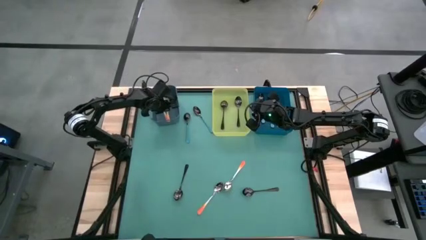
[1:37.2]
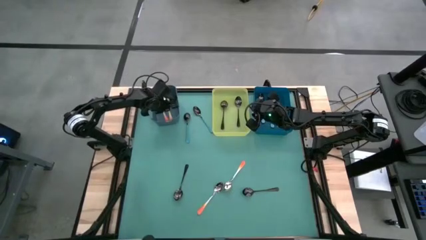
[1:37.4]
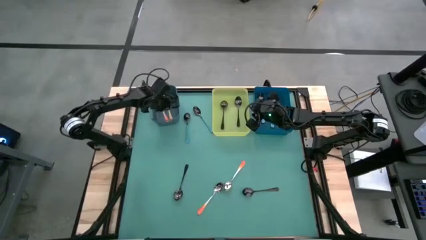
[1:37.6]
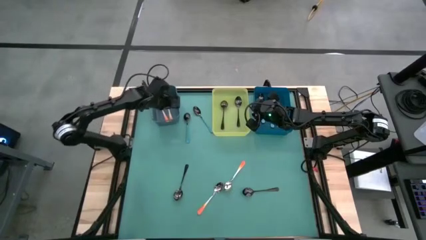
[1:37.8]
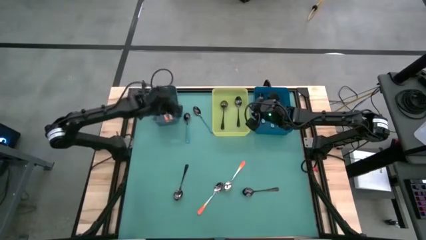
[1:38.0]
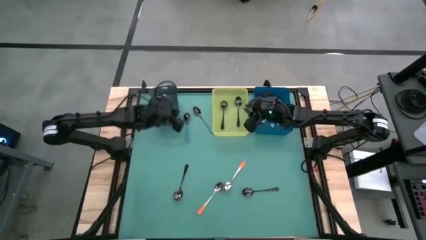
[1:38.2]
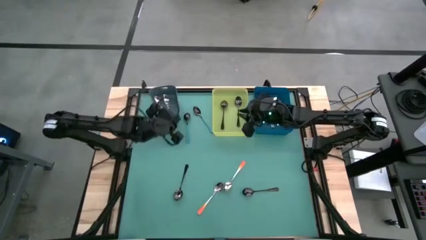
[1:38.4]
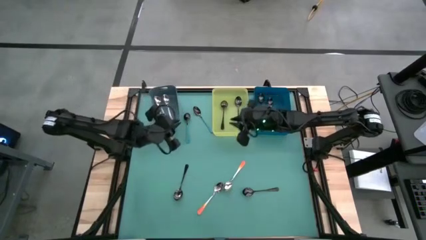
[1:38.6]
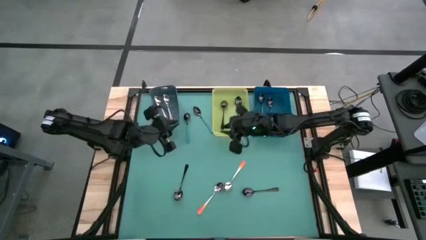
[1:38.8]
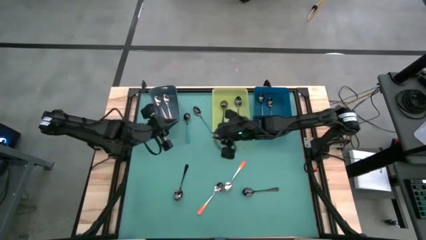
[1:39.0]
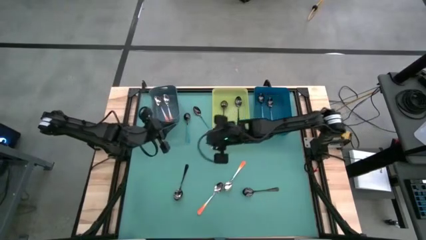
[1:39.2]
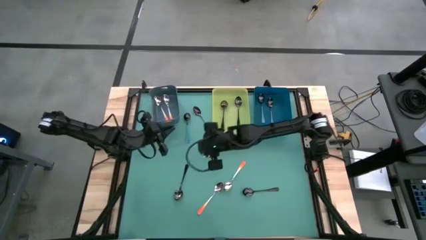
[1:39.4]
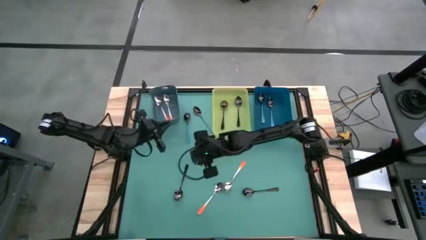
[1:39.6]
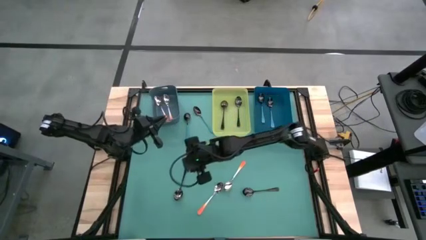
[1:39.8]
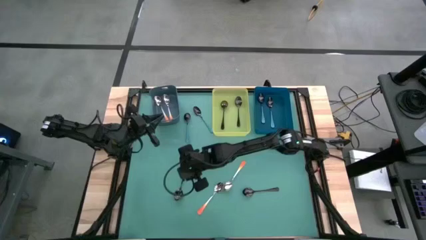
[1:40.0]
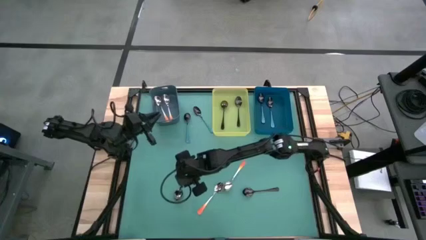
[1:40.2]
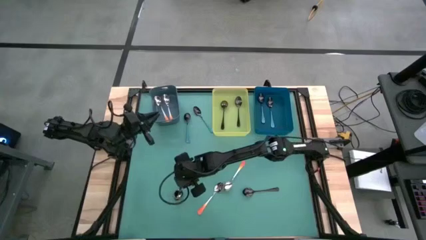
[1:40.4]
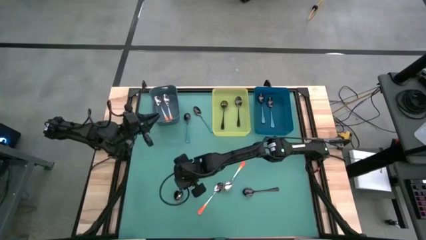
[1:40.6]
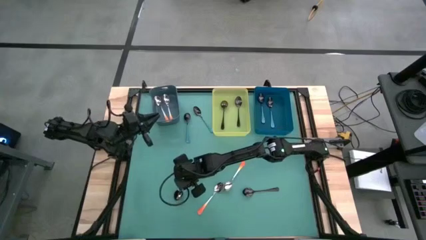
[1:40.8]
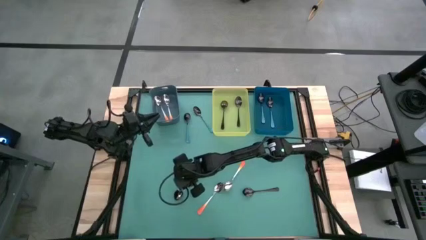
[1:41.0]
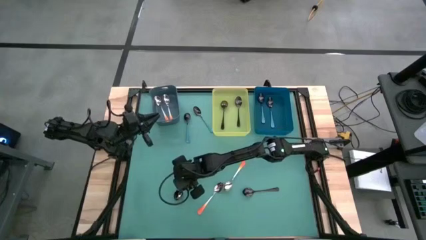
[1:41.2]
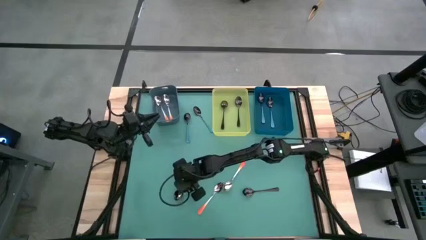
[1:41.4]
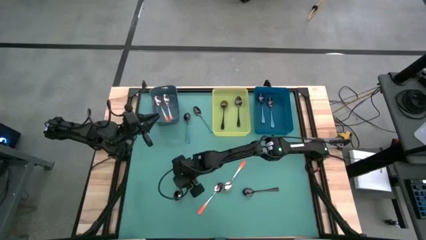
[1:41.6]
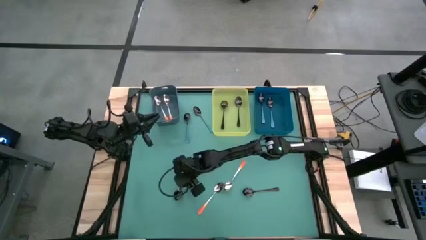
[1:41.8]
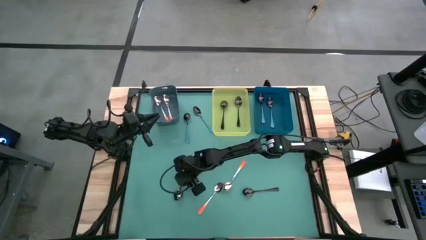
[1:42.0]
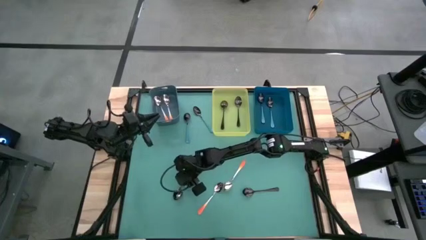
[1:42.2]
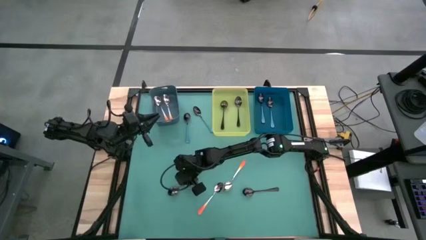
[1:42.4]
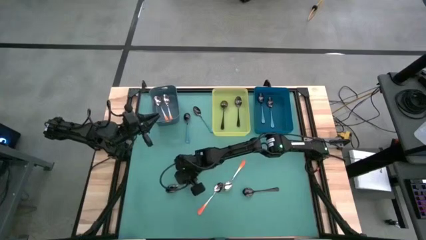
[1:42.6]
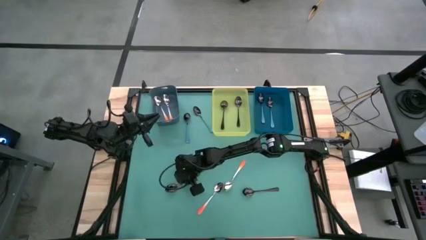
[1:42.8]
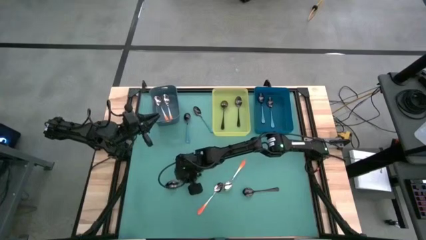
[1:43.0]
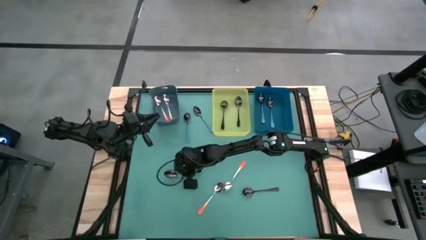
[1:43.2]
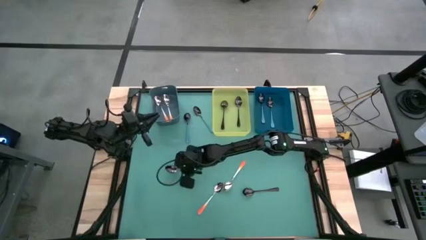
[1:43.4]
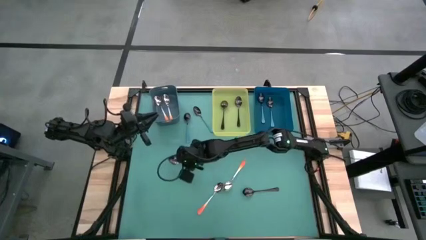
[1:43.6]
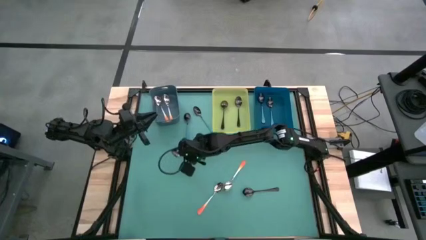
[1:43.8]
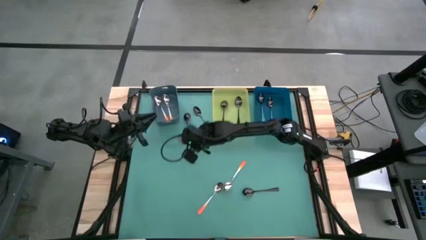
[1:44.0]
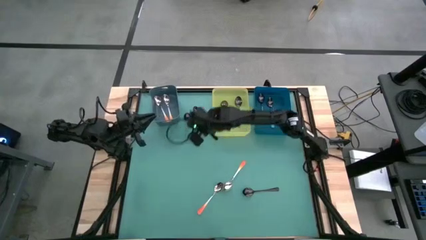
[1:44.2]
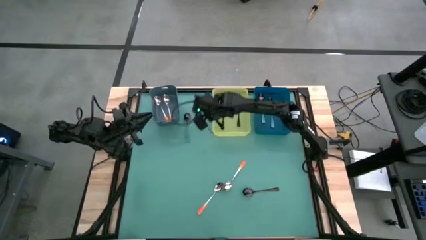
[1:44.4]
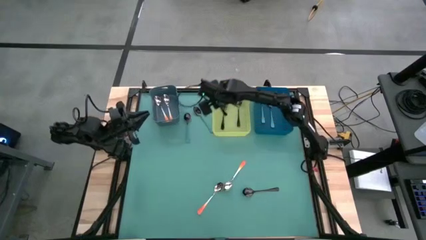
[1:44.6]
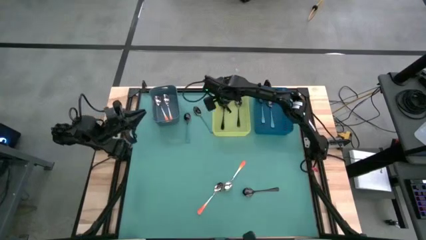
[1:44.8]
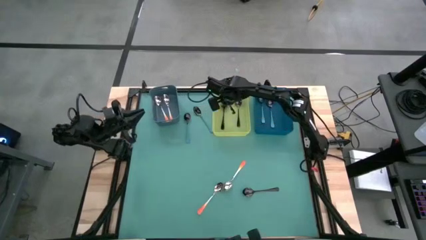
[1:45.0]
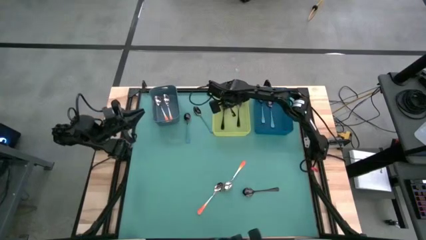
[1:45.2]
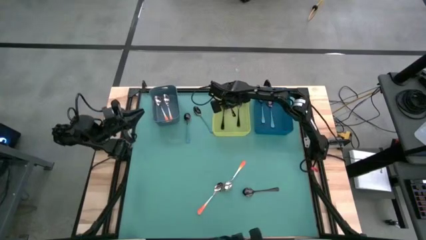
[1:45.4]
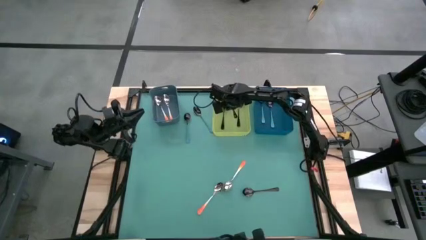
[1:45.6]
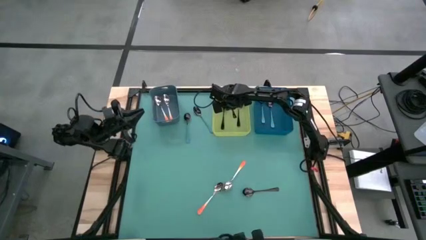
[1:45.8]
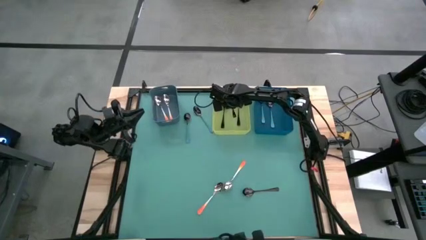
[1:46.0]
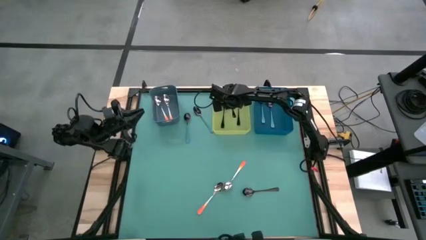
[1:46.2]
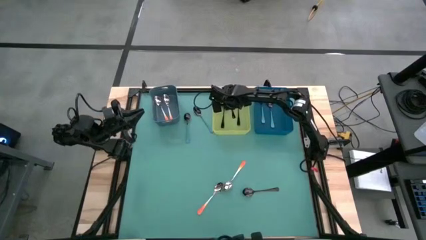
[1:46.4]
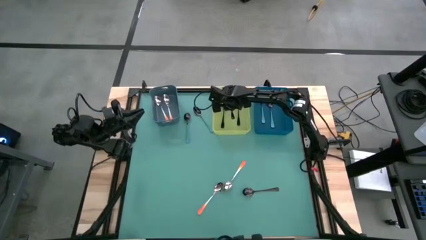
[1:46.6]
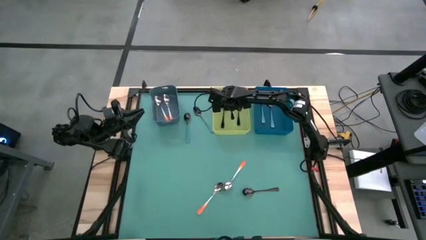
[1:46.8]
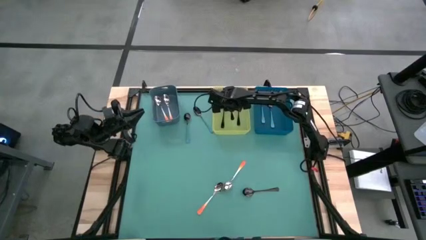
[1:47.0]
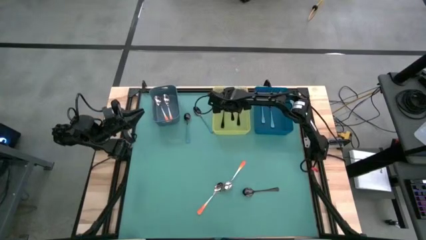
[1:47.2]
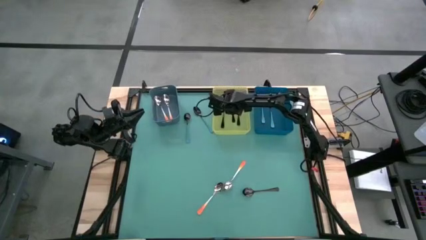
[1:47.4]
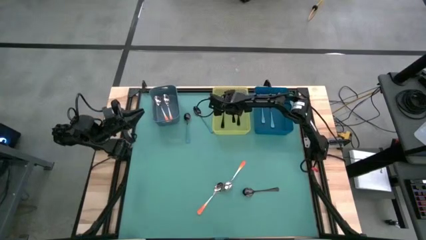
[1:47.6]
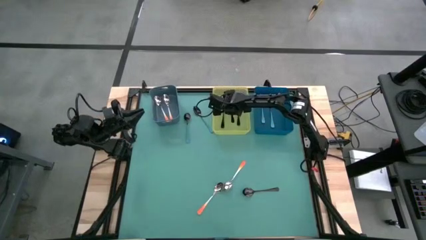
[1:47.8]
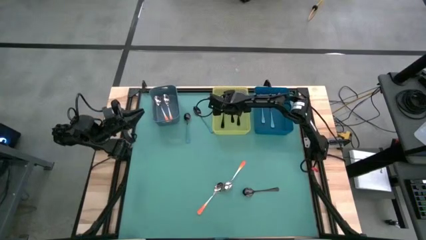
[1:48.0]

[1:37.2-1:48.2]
Task: Sort silverware by color (type)
Put the black spoon into the yellow bin

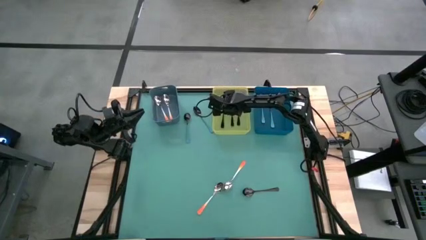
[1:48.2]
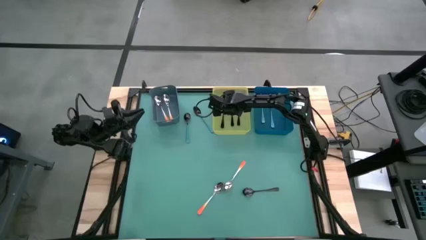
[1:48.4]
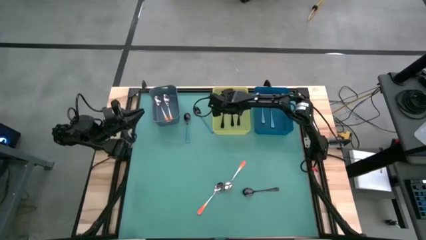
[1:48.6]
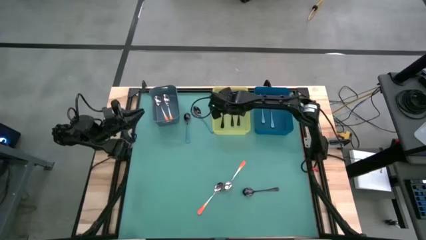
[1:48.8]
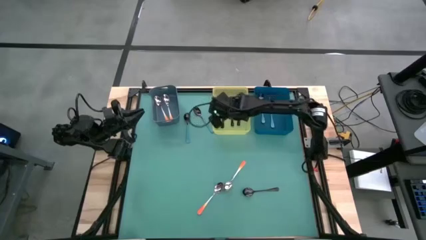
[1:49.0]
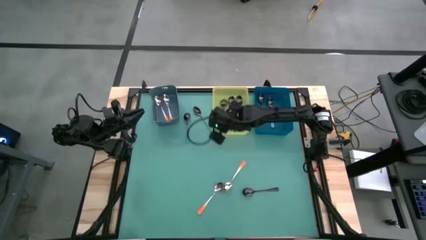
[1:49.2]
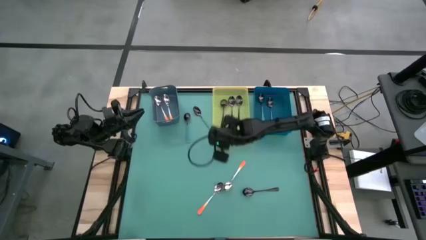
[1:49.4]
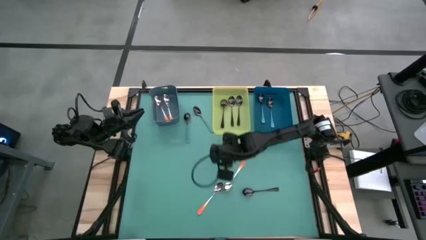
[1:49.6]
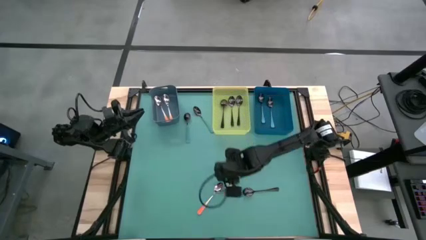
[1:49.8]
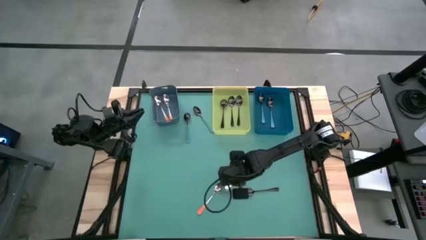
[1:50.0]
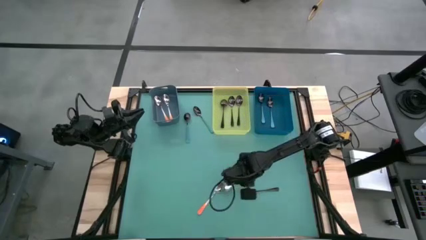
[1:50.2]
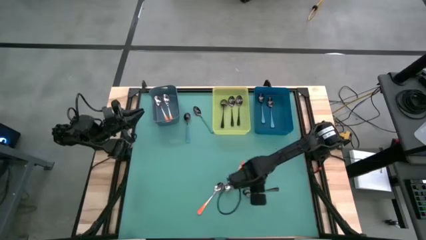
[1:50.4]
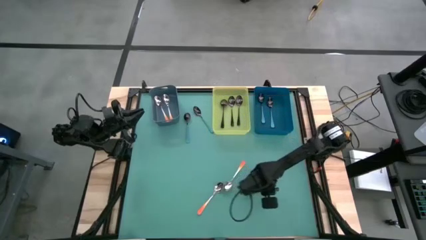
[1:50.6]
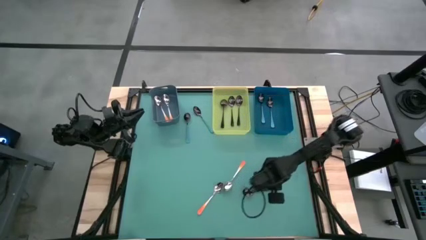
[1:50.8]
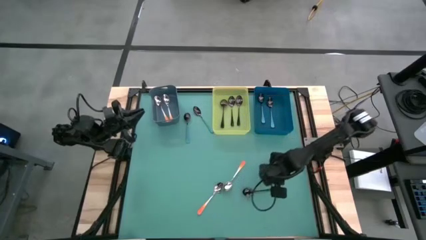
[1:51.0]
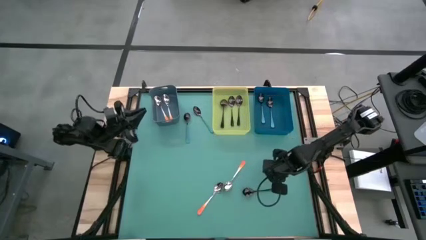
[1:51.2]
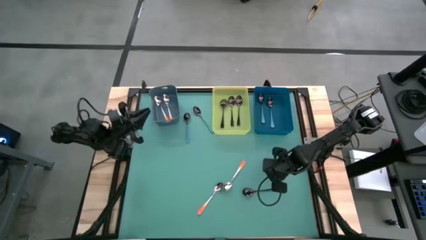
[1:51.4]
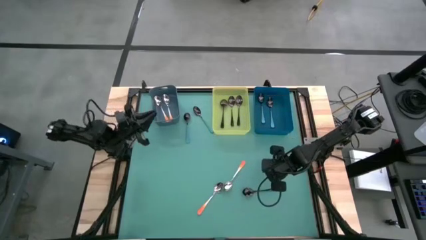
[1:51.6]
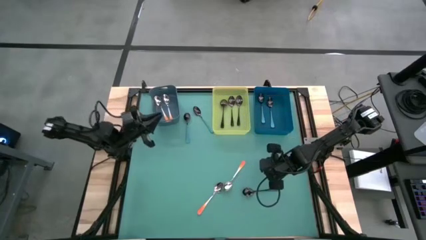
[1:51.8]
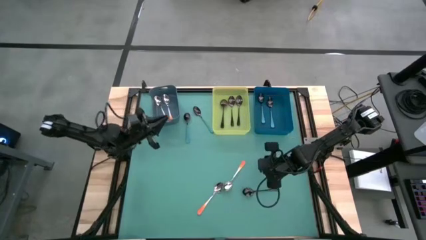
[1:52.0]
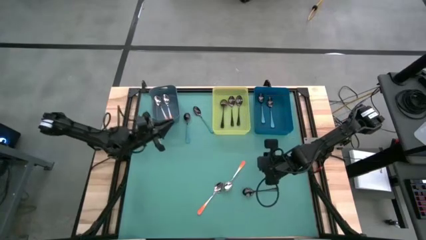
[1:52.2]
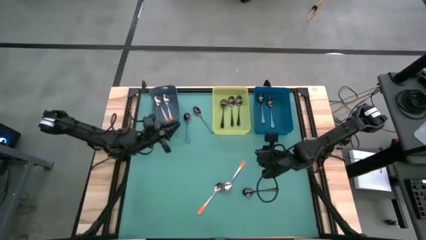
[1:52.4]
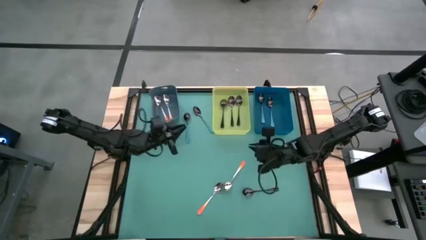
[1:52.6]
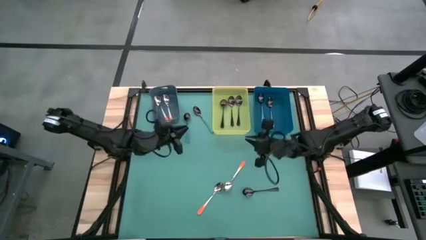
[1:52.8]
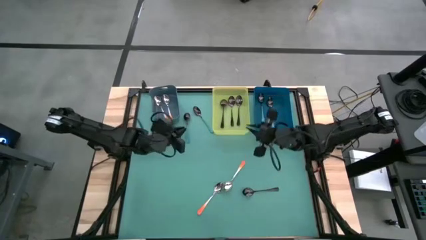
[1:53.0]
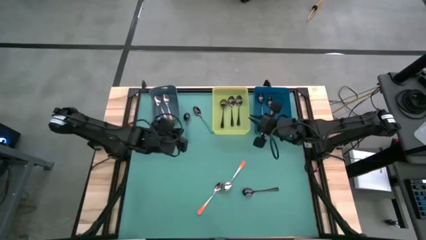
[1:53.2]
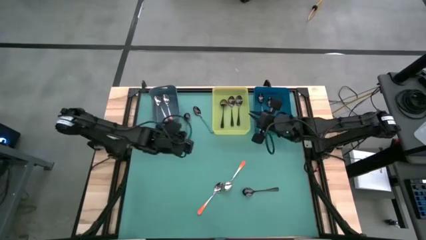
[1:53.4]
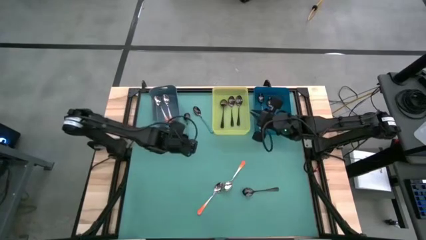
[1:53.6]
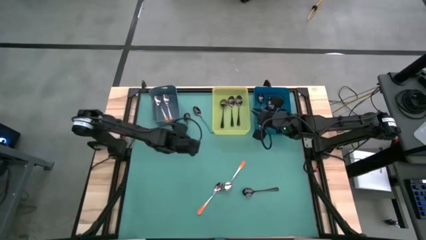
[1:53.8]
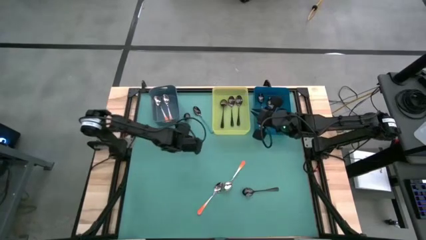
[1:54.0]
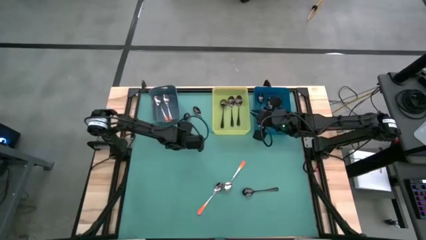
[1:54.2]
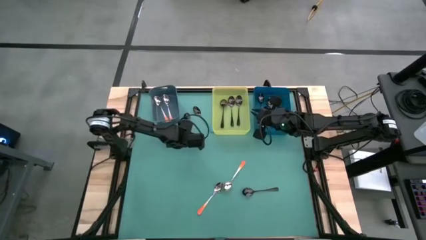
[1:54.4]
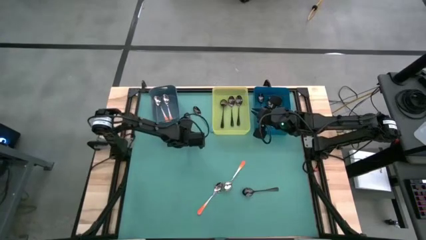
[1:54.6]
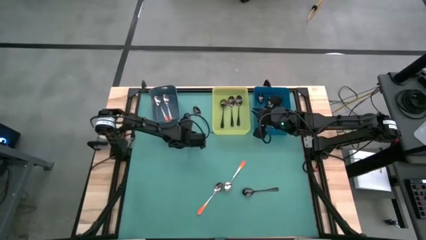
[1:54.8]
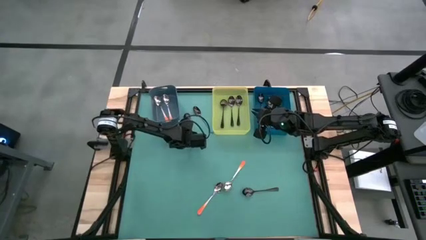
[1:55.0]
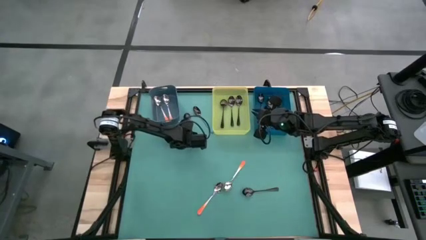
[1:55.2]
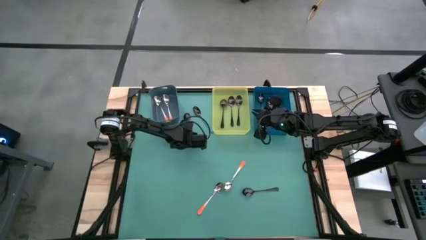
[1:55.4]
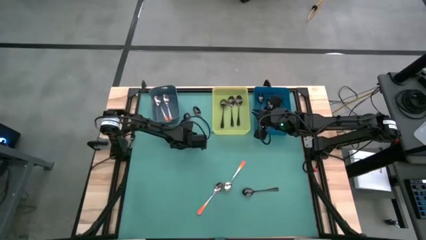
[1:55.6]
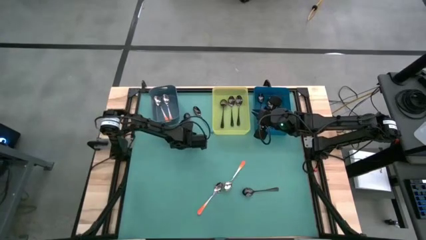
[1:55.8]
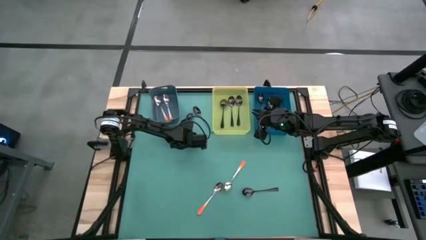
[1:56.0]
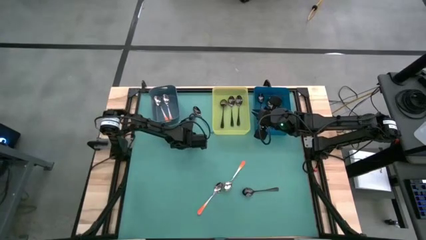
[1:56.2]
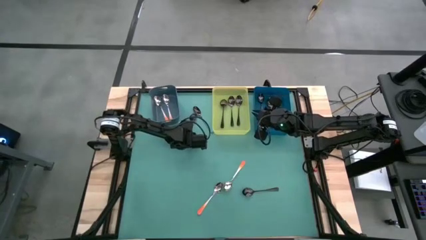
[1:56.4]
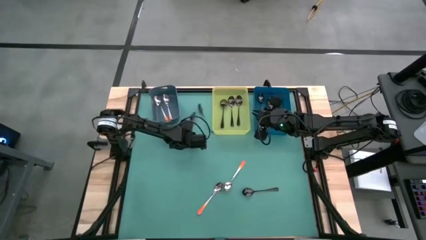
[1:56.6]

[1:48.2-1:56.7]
Put the blue spoon into the blue bin
